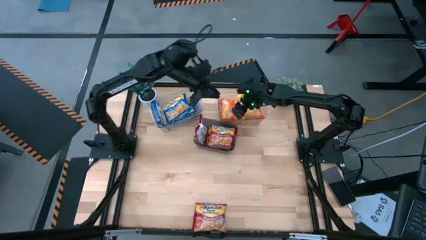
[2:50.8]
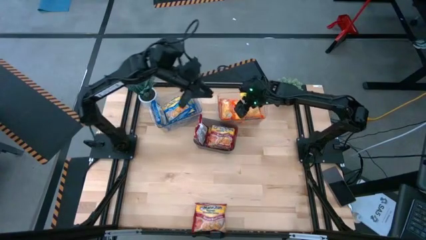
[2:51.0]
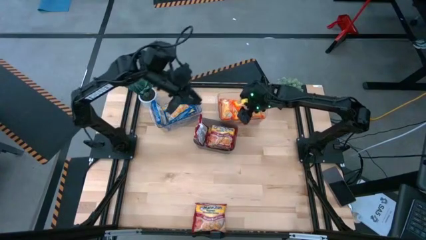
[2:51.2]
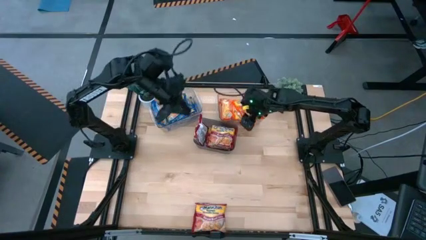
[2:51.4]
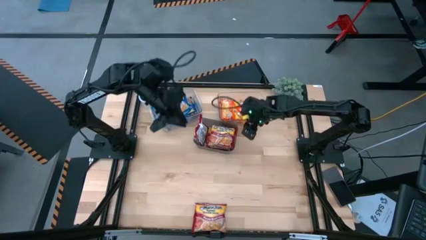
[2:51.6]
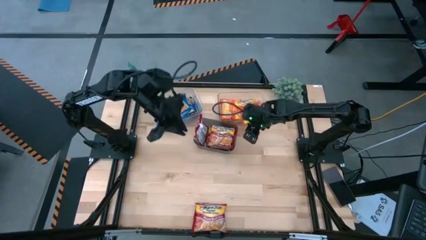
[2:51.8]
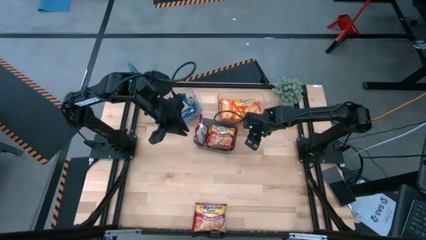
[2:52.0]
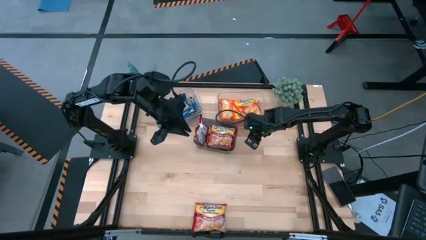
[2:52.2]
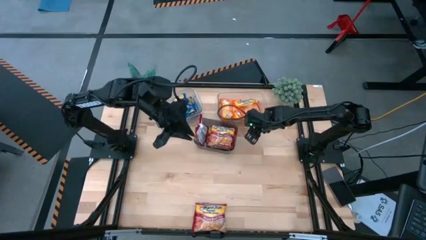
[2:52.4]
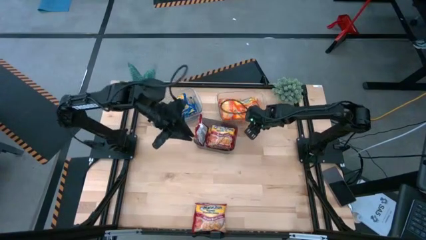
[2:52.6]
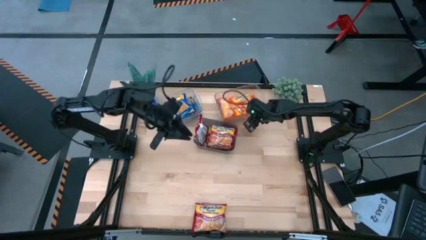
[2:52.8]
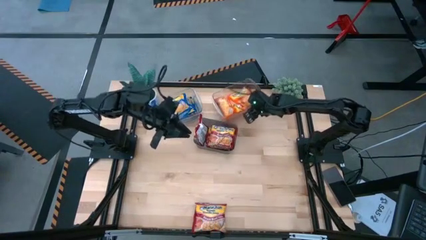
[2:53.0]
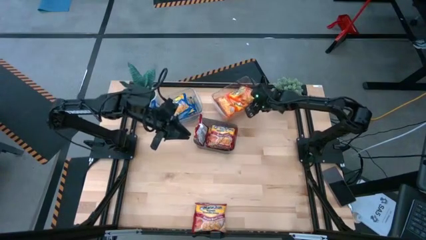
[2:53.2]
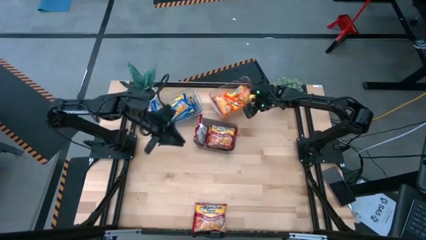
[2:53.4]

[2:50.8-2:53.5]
Task: Sort Maruchan noodles
Adjust the right transparent bin on the table

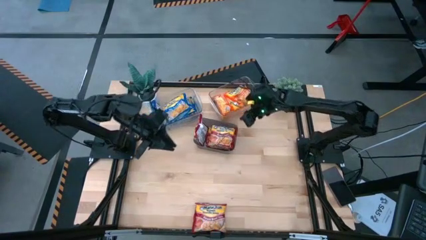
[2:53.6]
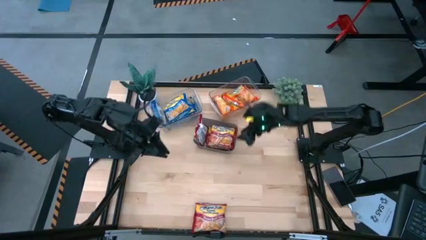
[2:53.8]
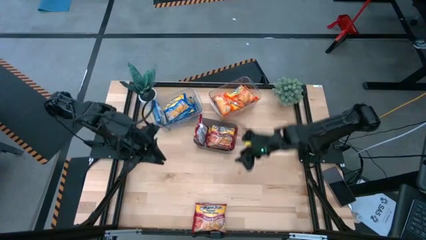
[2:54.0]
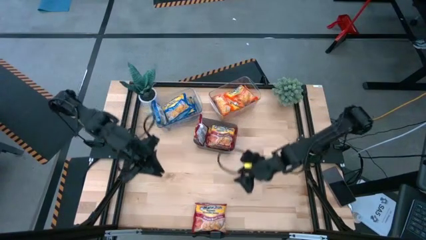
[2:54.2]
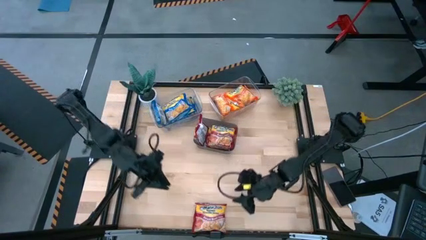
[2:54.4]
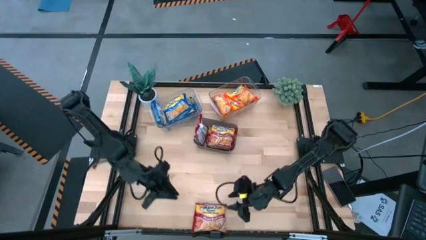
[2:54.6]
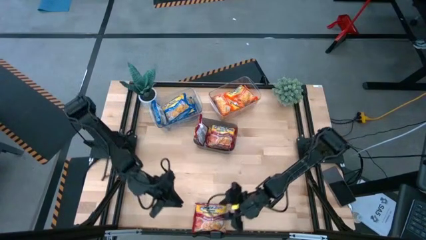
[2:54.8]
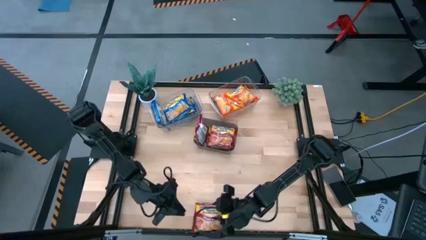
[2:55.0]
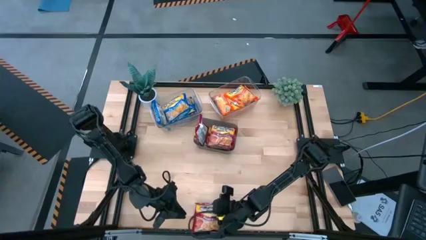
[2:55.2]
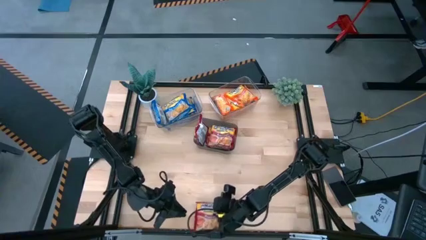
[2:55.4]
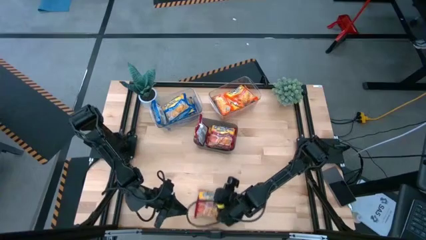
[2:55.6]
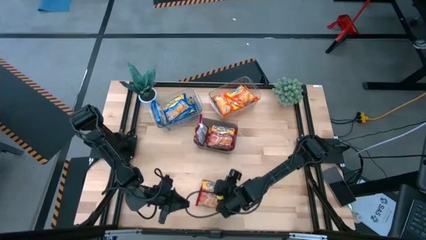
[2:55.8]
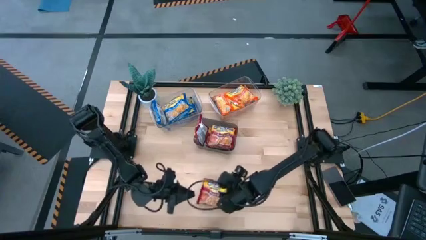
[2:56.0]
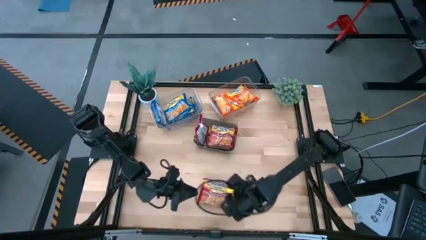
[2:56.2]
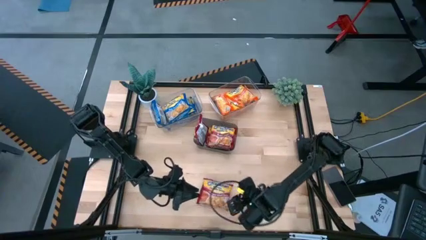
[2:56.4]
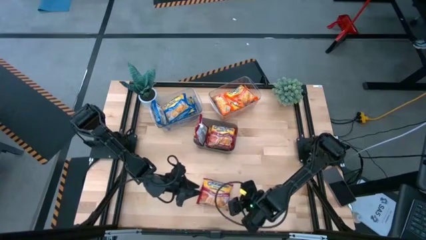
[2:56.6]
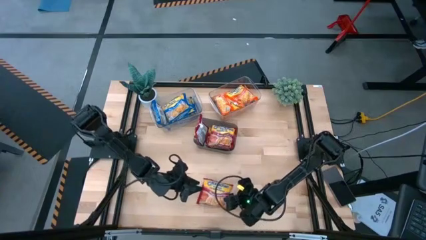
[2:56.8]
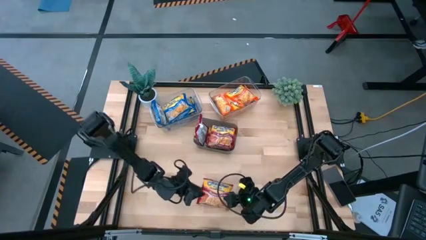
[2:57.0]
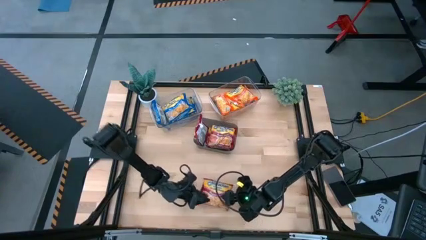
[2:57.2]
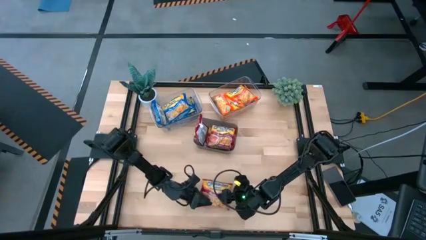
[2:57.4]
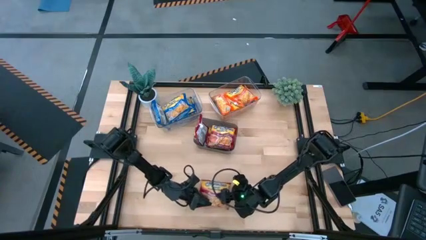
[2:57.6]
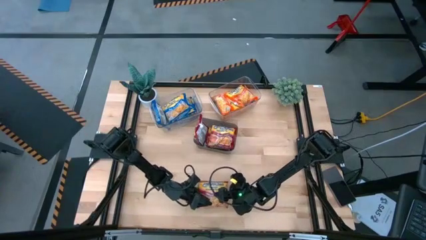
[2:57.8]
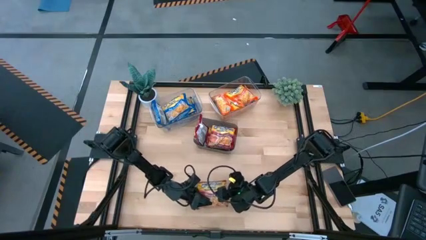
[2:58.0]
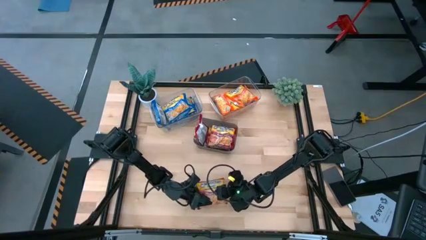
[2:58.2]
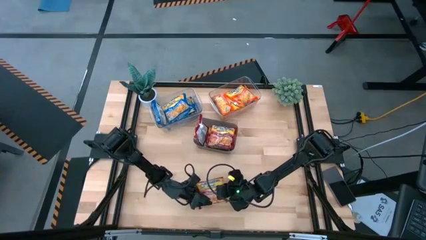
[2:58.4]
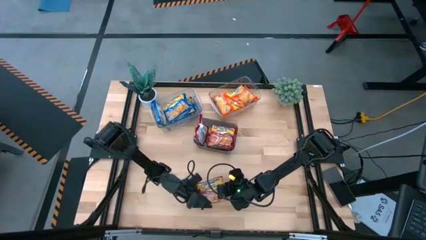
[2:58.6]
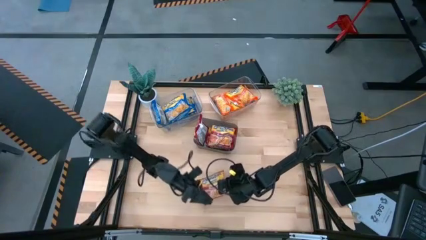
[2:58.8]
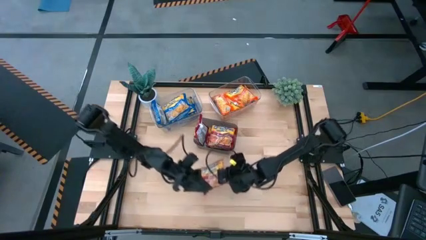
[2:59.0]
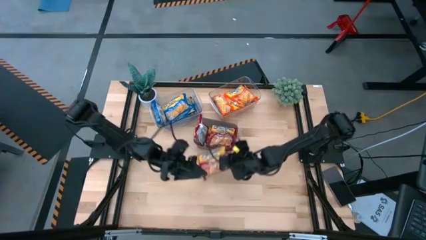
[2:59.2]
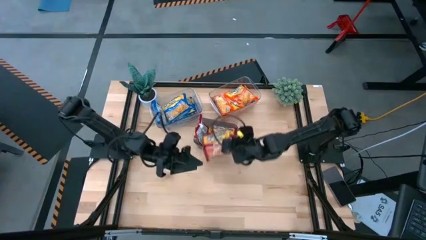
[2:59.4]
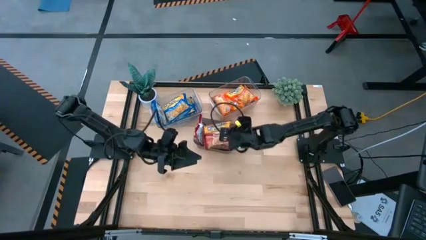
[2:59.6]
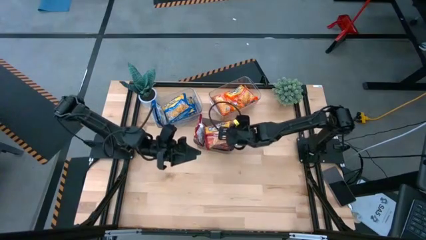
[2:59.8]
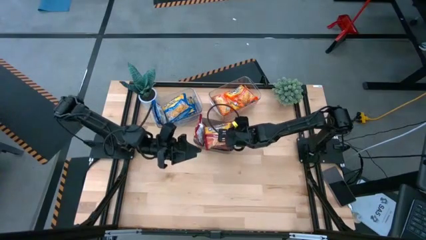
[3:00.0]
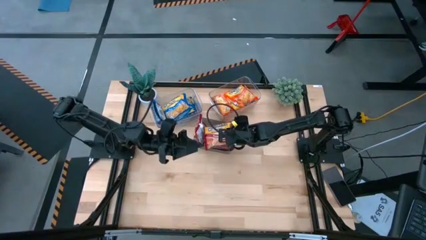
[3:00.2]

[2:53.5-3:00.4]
Stack the red noodle pack on top of the red noodle pack

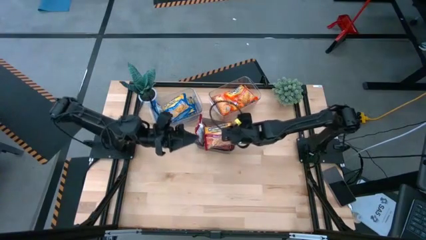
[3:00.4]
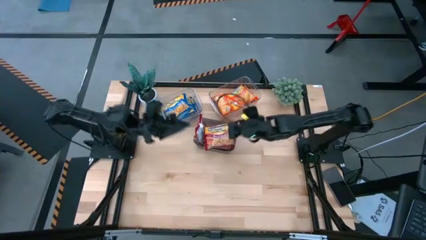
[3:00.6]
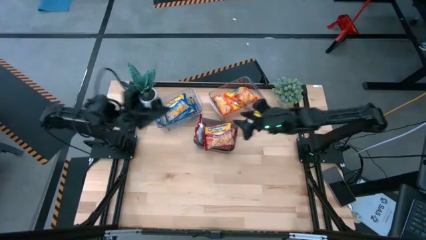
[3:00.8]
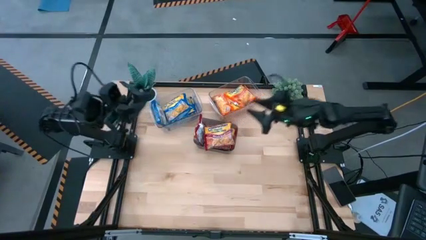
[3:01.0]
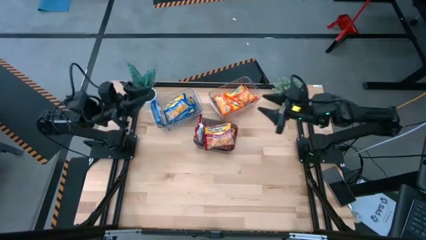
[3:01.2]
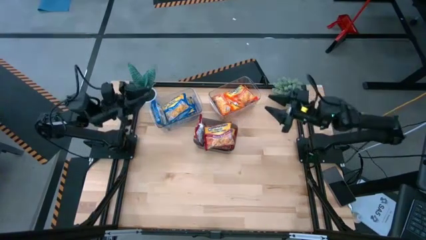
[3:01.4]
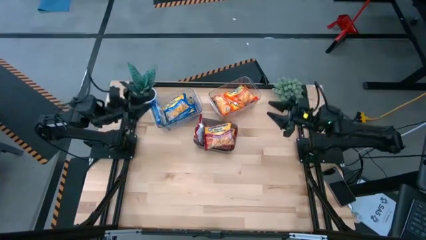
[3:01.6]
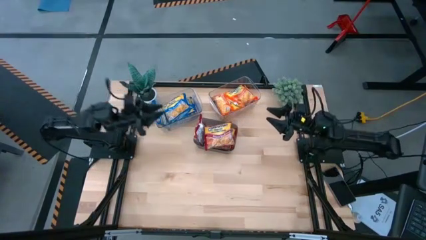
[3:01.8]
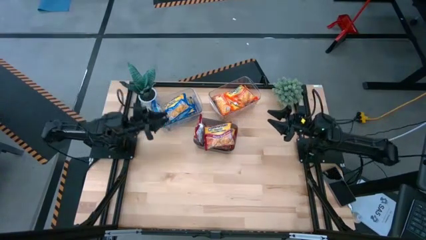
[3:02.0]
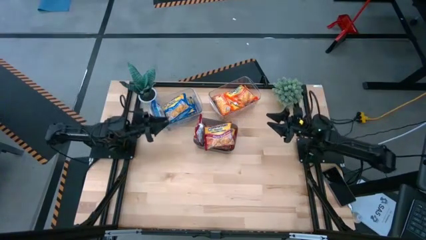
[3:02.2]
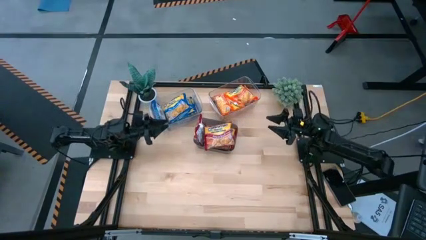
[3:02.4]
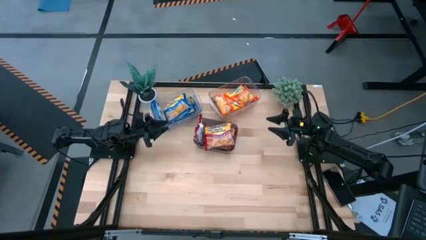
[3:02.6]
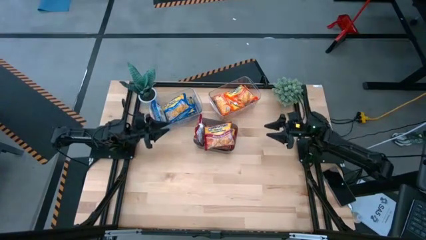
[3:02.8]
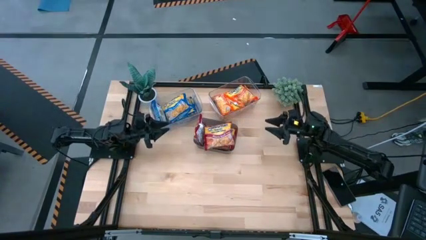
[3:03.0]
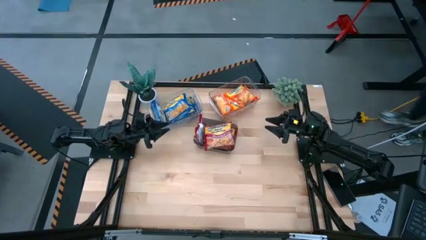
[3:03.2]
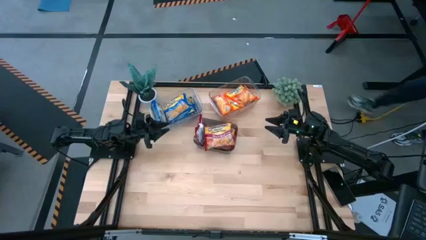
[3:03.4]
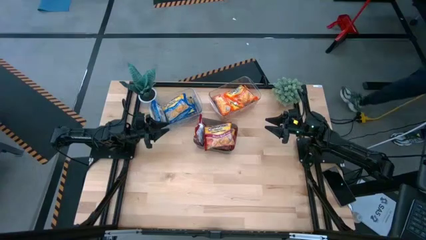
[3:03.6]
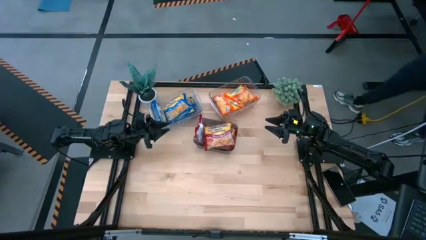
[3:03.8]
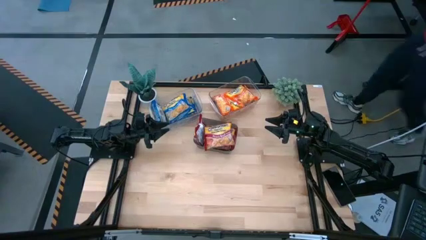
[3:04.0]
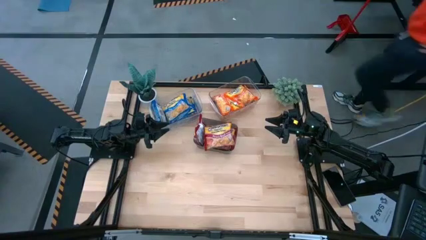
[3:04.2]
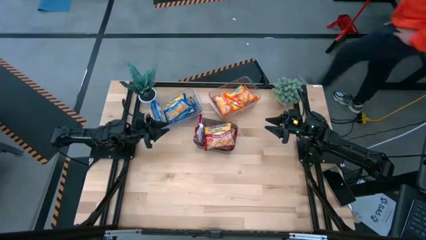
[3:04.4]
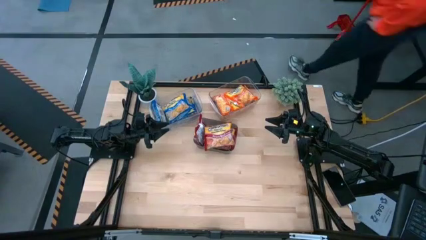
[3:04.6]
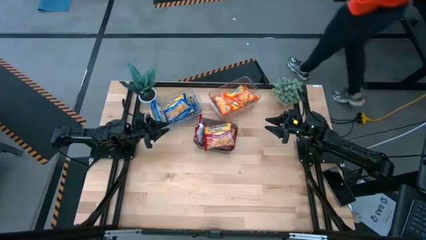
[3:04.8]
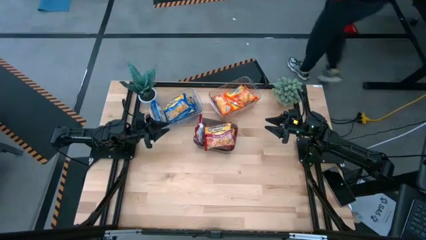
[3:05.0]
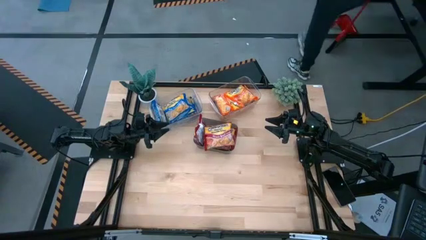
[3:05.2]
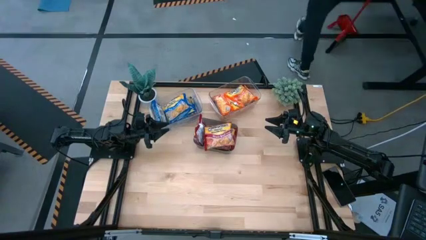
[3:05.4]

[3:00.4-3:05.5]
Return to Home Position

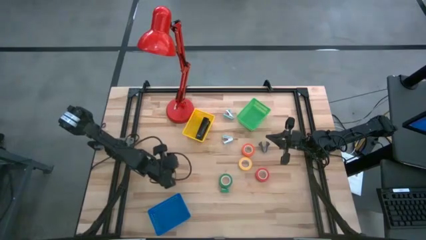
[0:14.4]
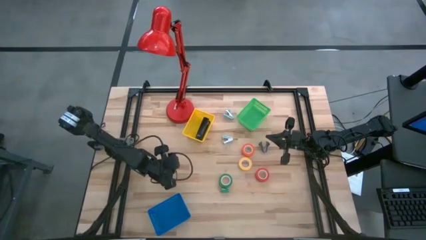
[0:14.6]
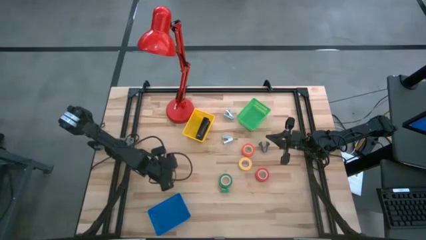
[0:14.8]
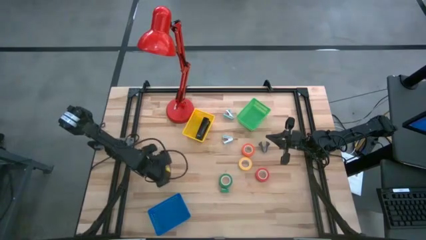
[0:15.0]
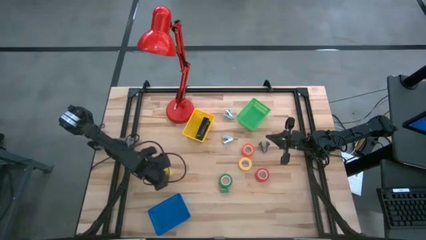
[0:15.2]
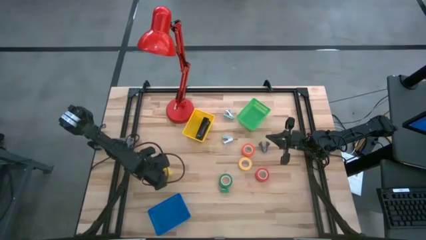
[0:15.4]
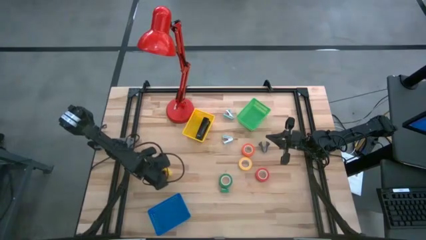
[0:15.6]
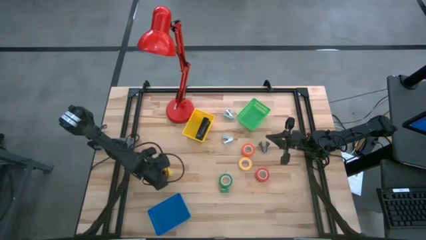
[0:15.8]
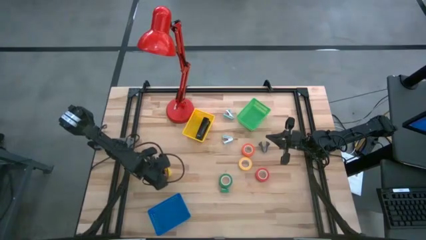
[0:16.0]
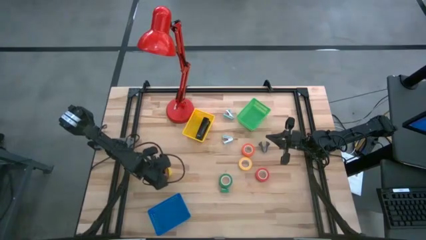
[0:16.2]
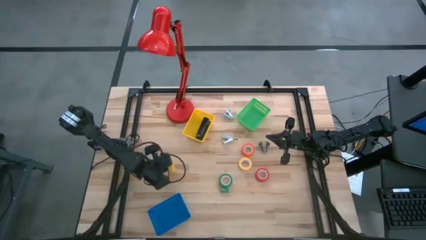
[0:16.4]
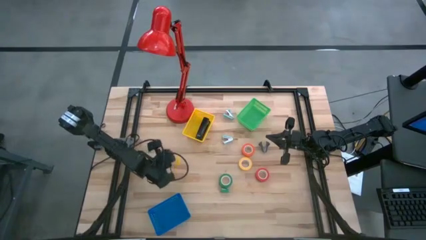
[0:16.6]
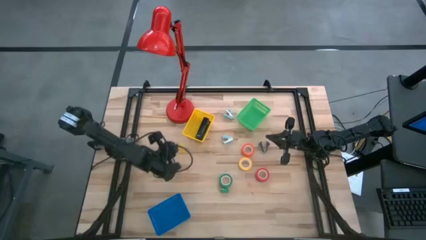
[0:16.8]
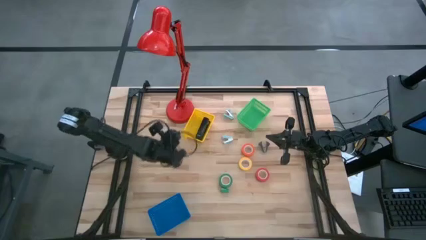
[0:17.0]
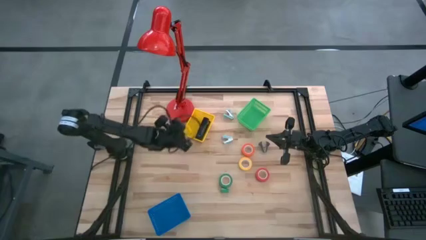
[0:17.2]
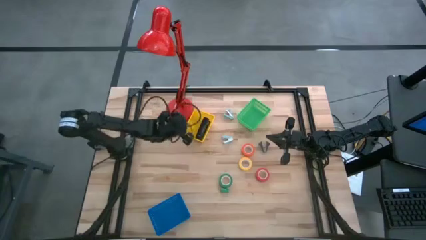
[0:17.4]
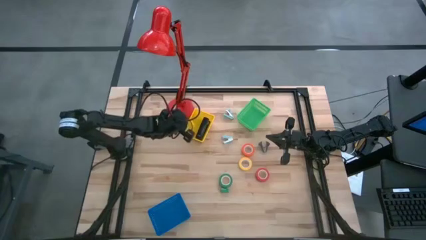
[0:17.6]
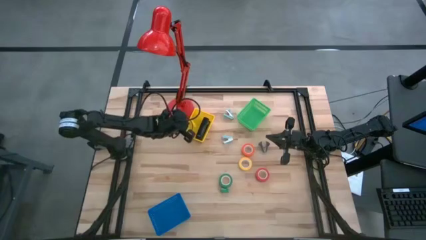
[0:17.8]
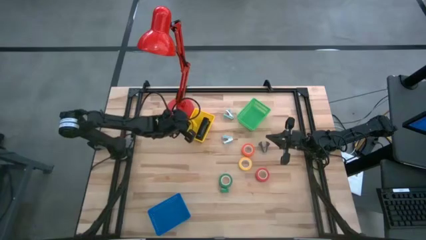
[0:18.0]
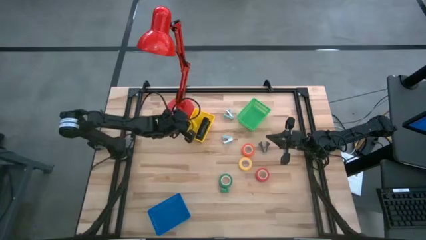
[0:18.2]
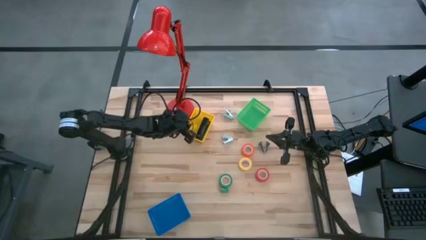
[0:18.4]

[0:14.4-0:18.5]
Task: Pick and place Stapler, Stapler remover, tape
Put the yellow stapler into the yellow bin
